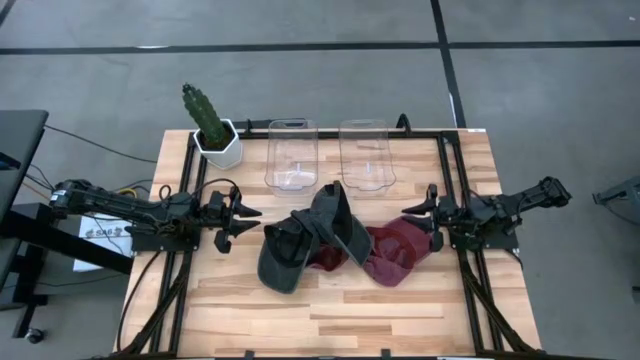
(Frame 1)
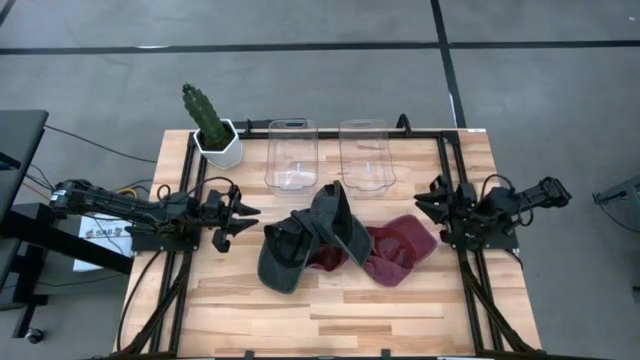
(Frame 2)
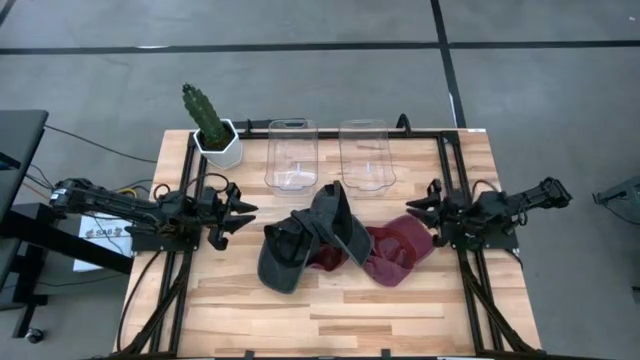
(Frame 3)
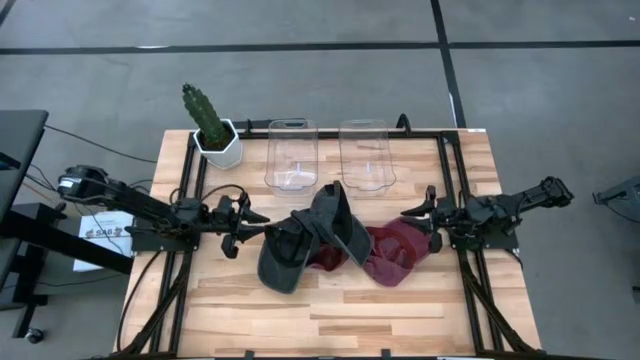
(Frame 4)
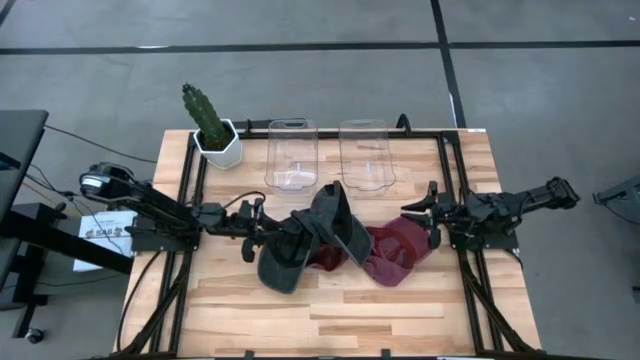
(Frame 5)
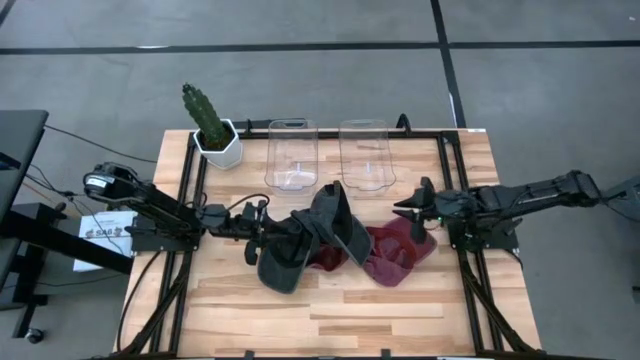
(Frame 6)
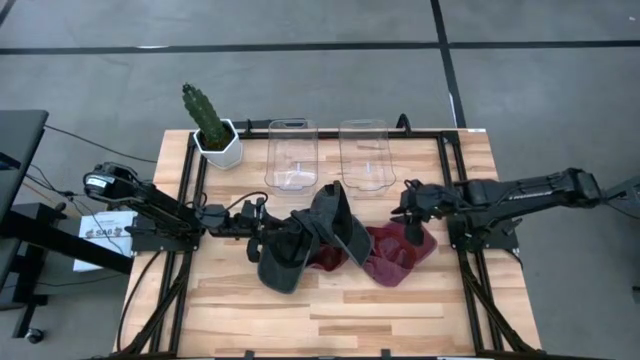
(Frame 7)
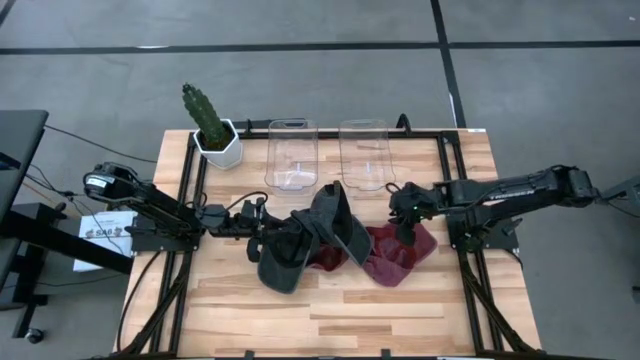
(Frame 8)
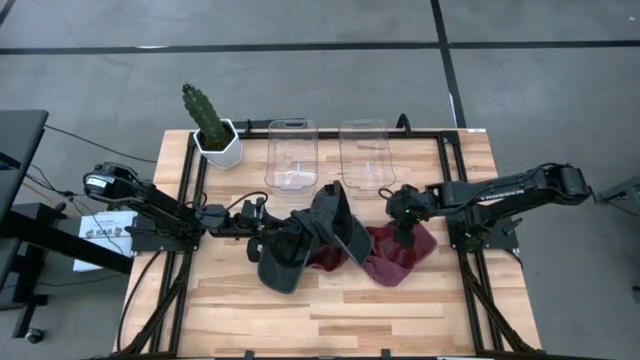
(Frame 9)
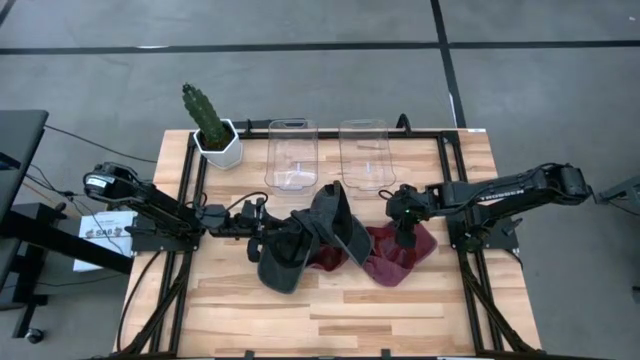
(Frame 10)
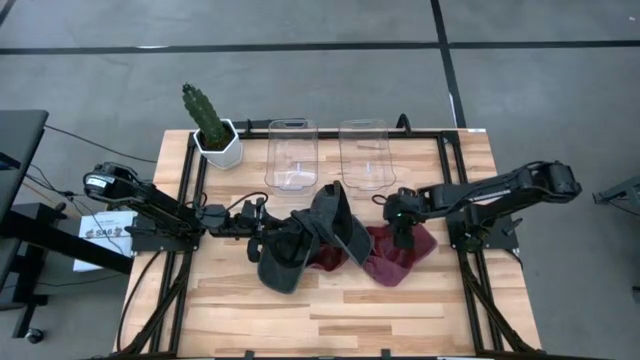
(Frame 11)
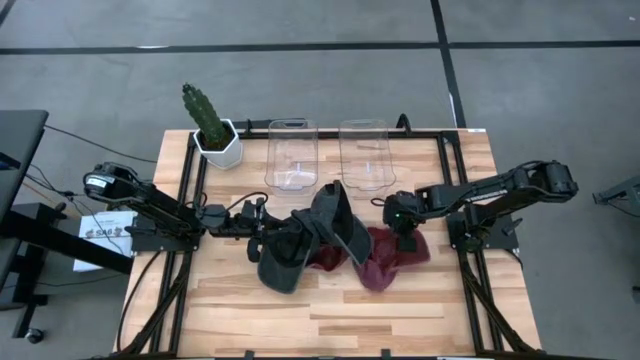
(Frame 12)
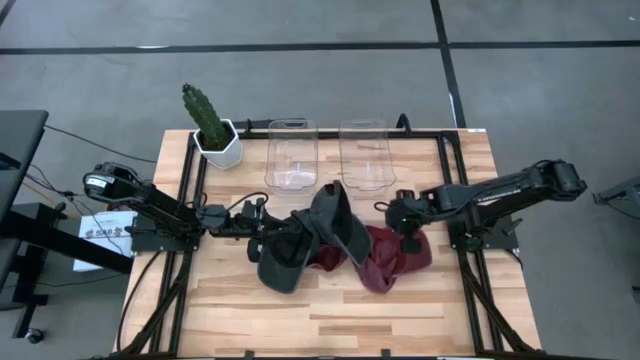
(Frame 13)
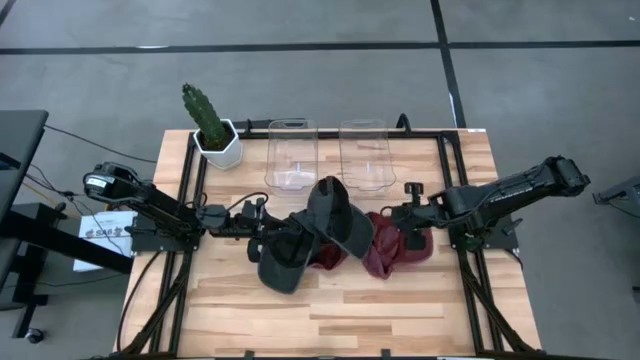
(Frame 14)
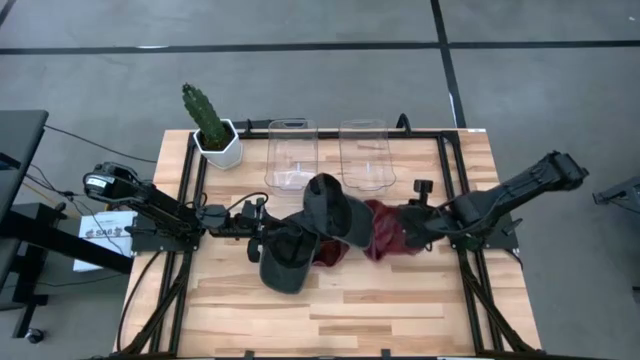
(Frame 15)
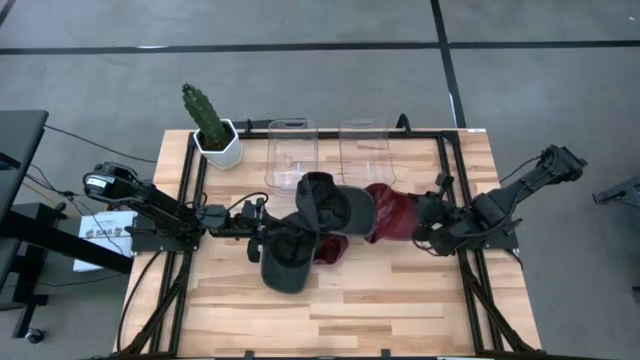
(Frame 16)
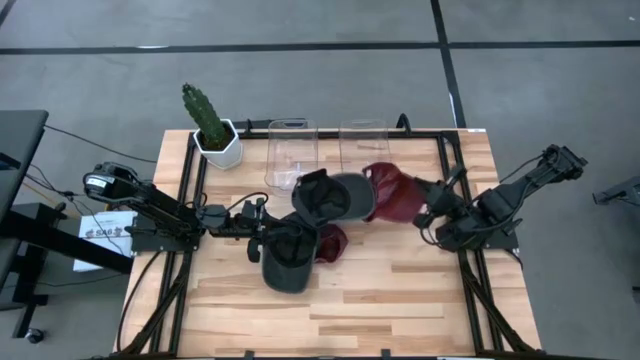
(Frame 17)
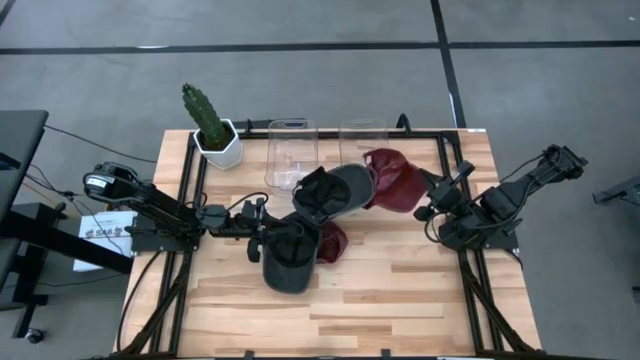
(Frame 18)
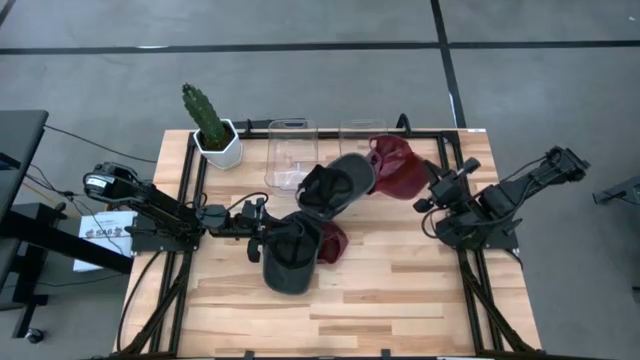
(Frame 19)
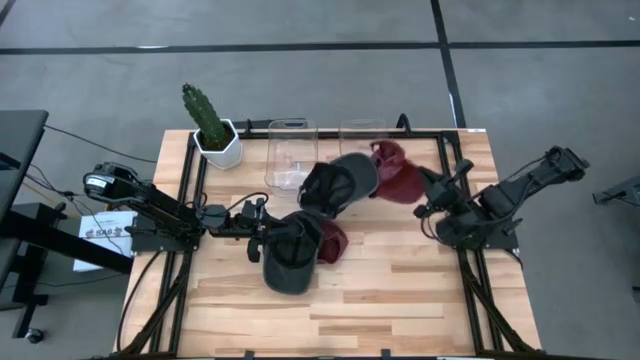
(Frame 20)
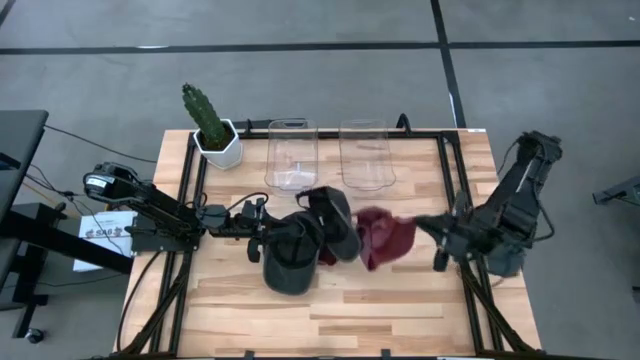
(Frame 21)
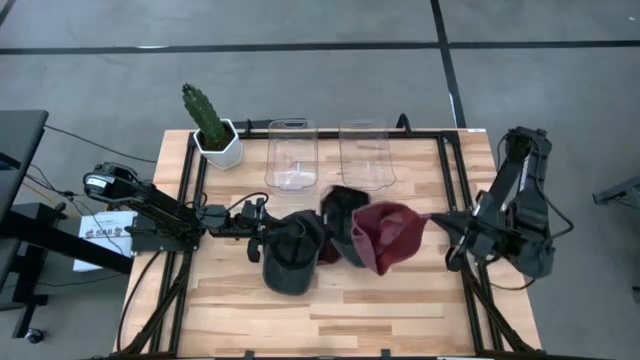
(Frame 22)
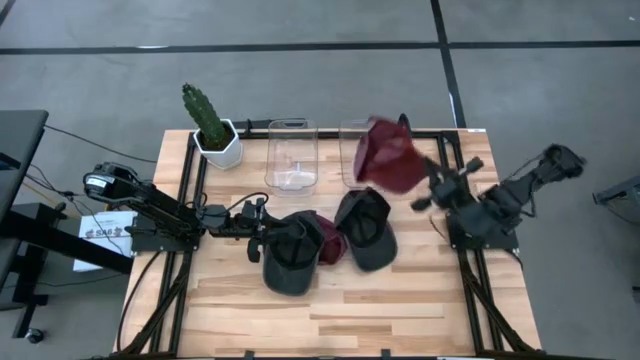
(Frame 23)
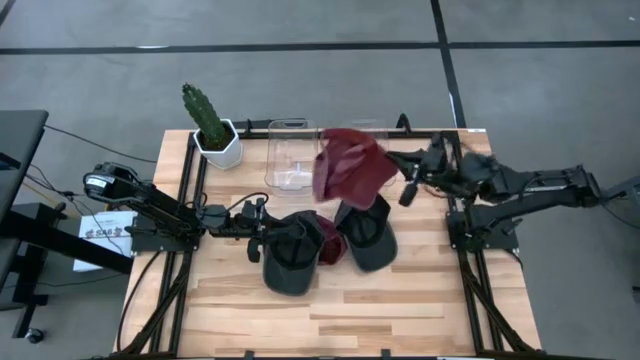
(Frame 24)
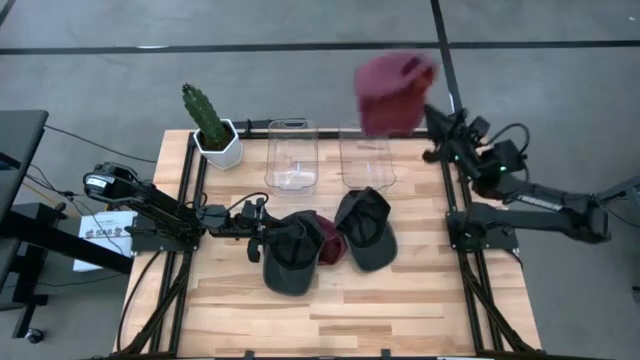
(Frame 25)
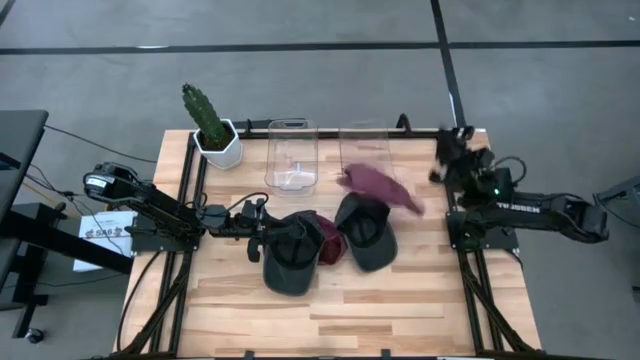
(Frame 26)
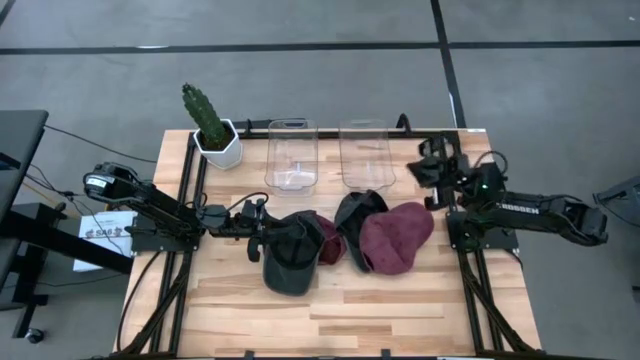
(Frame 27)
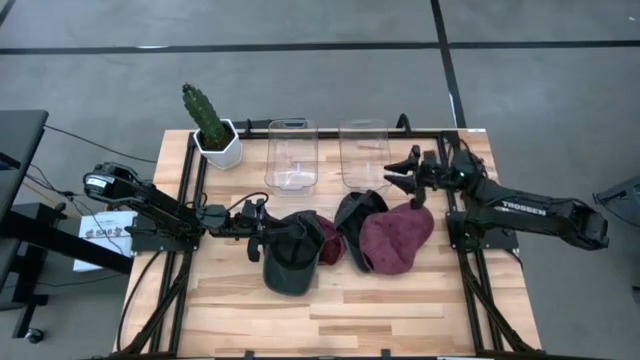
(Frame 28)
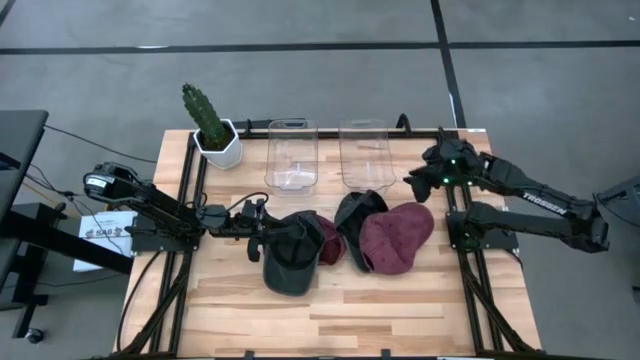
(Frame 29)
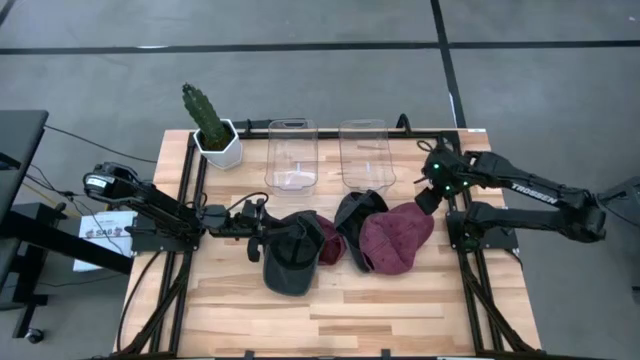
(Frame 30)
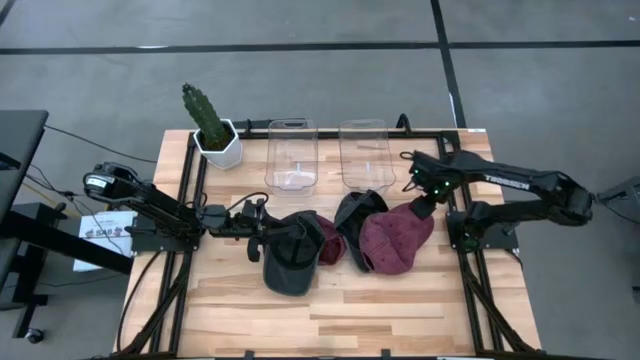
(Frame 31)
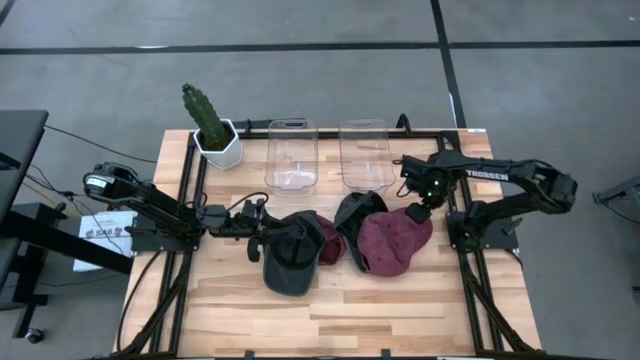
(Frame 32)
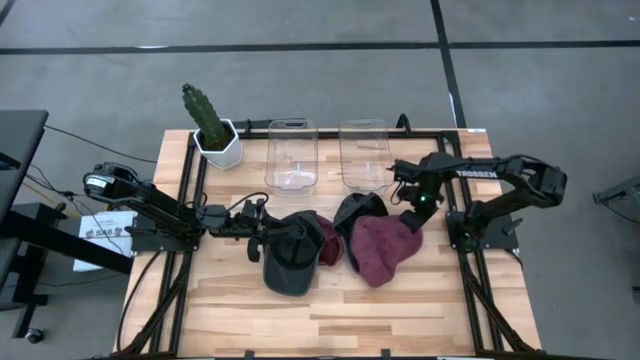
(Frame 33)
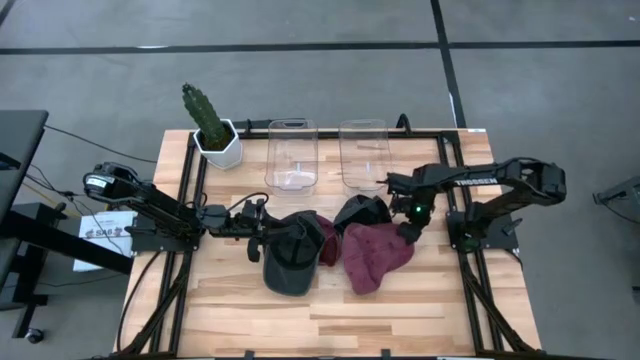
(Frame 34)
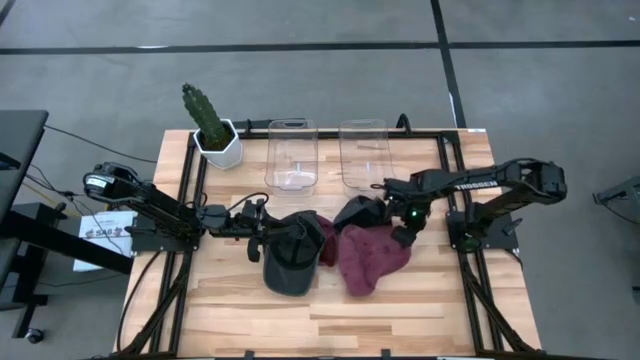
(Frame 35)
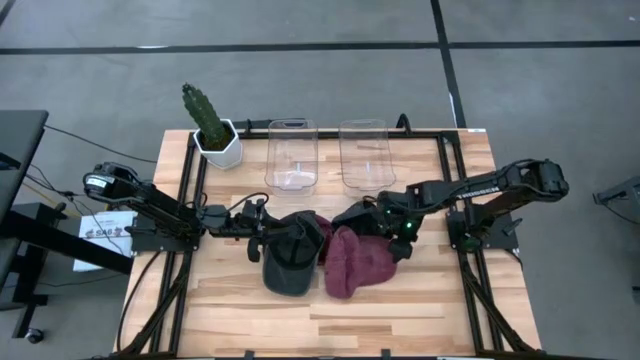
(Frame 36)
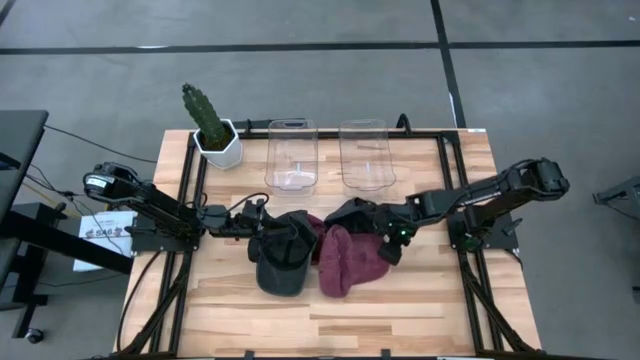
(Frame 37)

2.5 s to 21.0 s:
Task: Pick & Place hat
Put the right red cap into the right transparent bin
